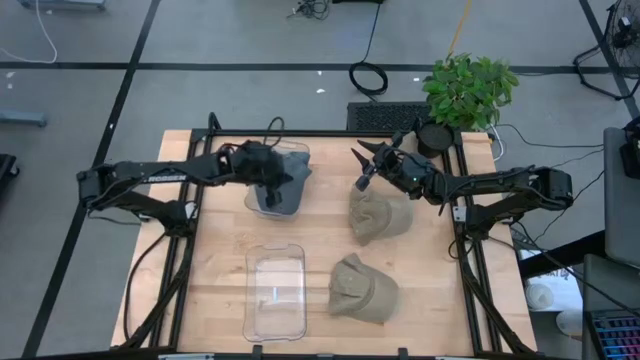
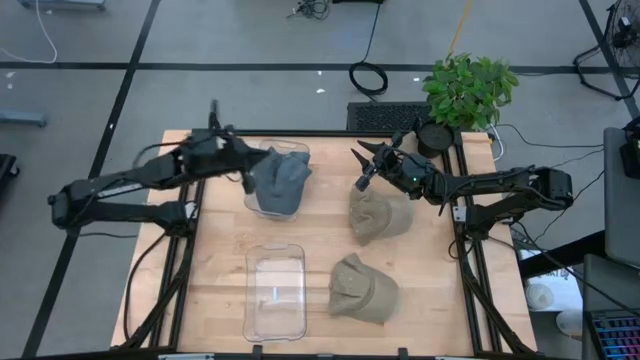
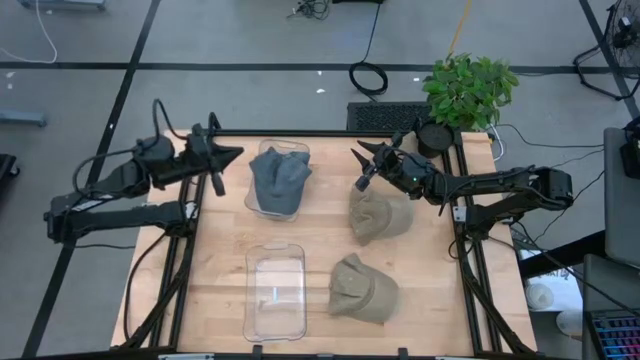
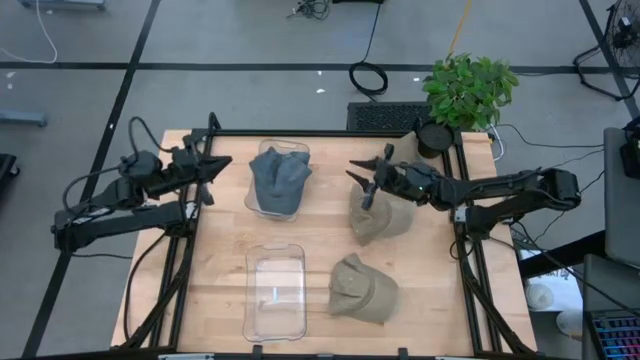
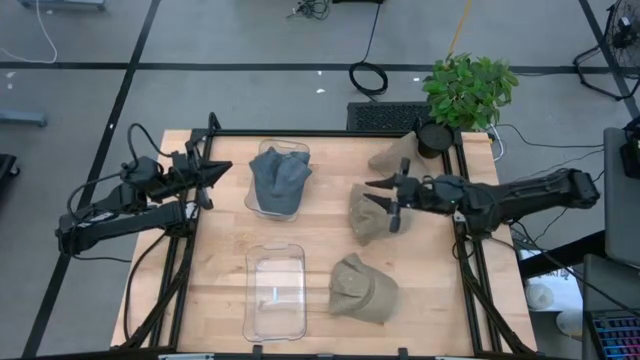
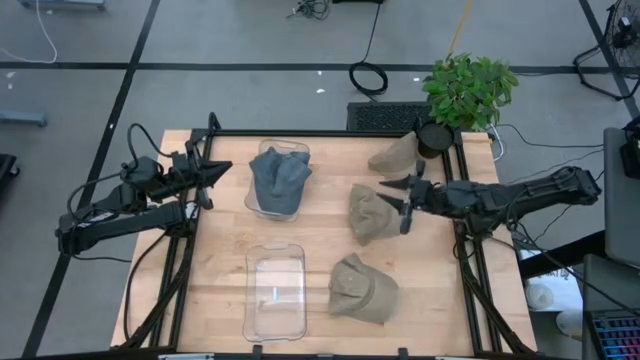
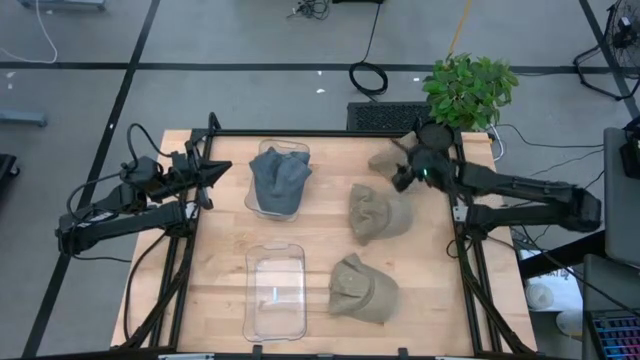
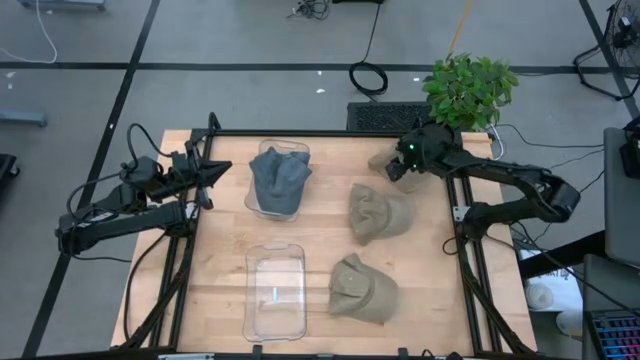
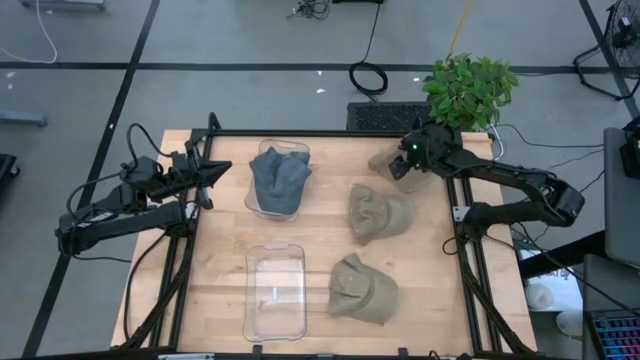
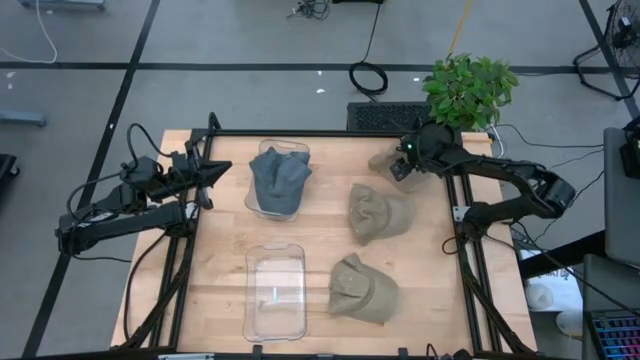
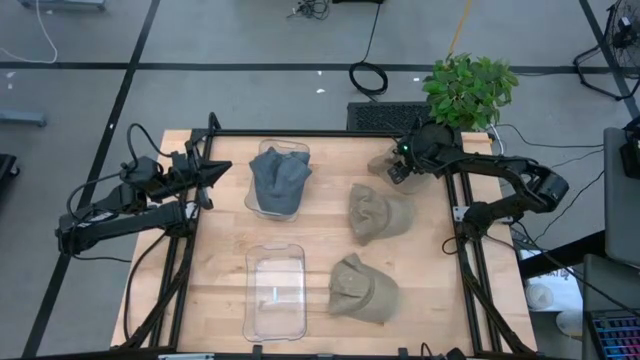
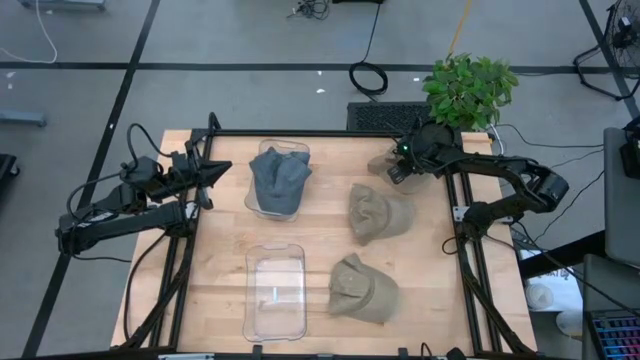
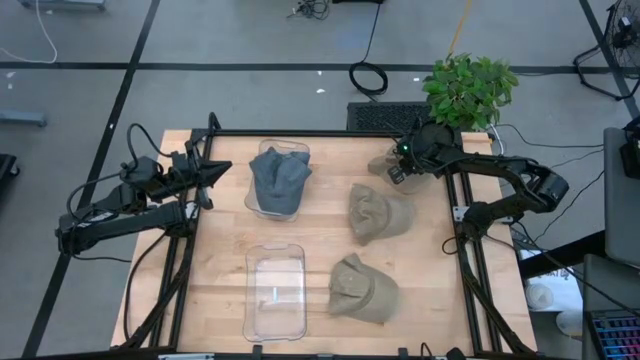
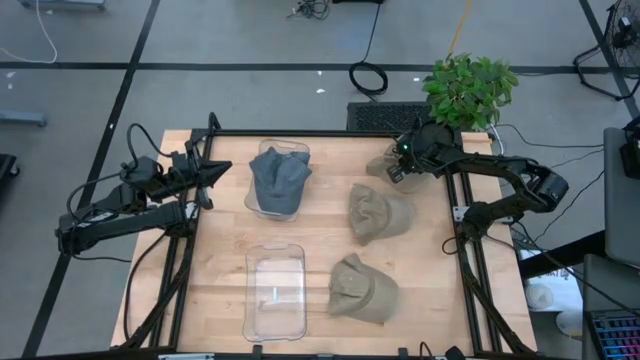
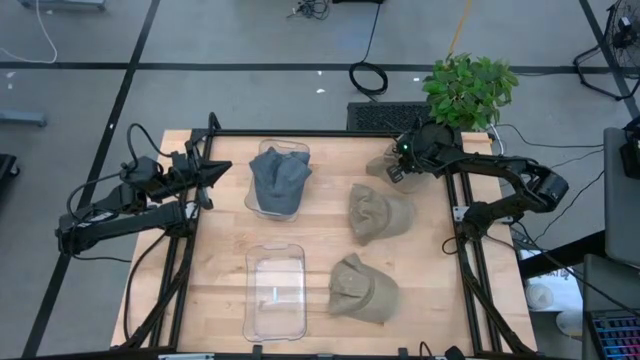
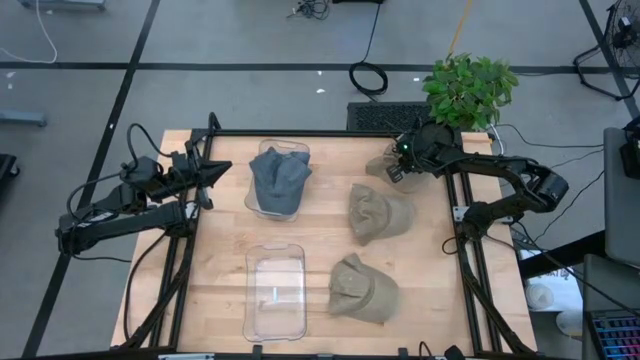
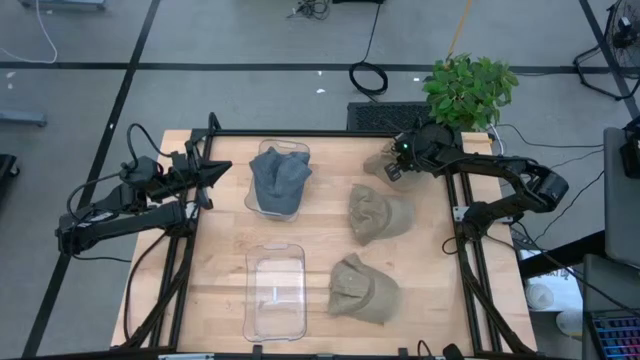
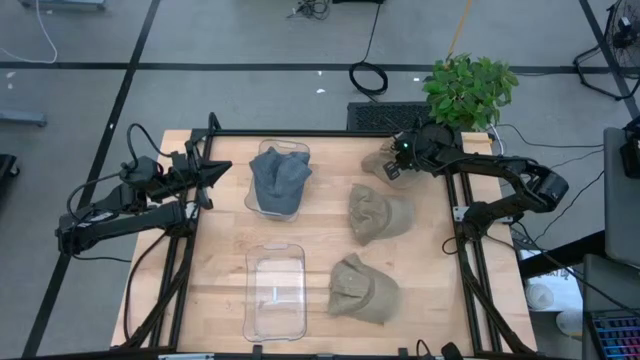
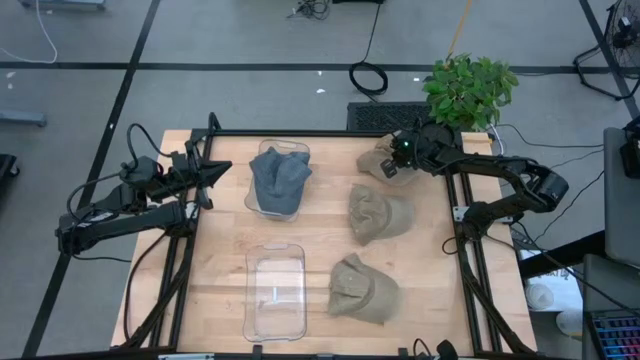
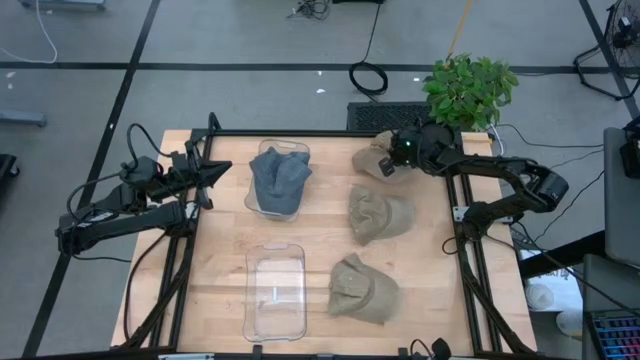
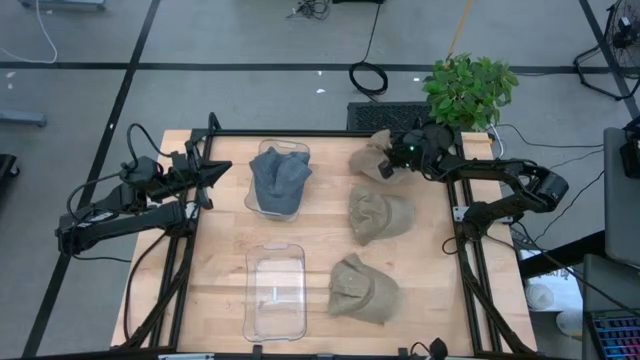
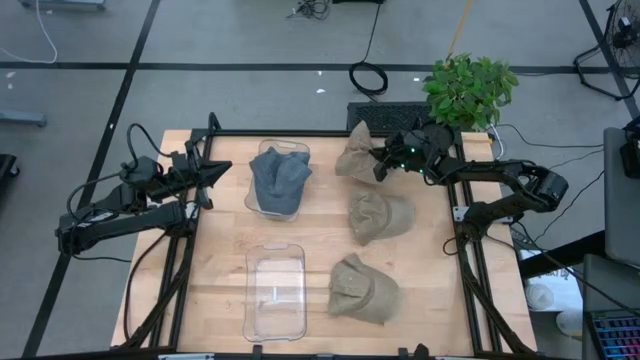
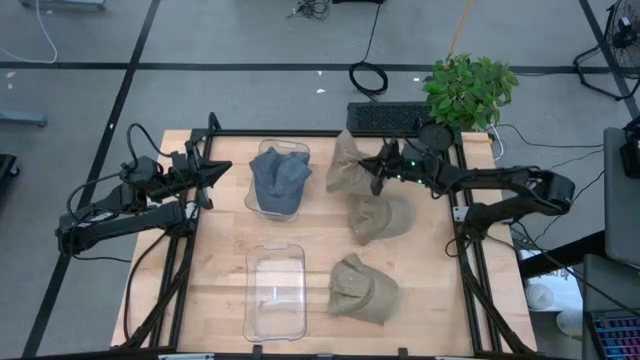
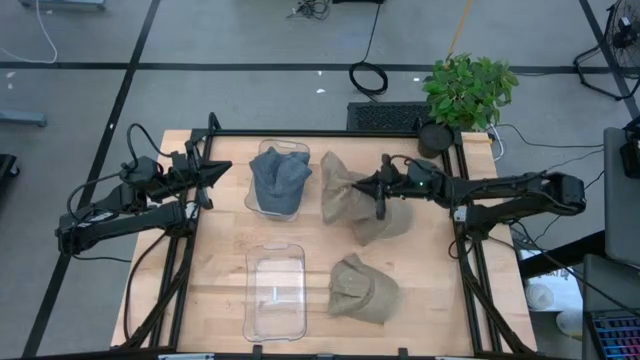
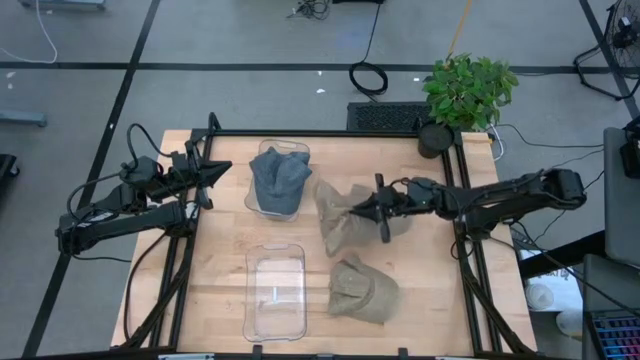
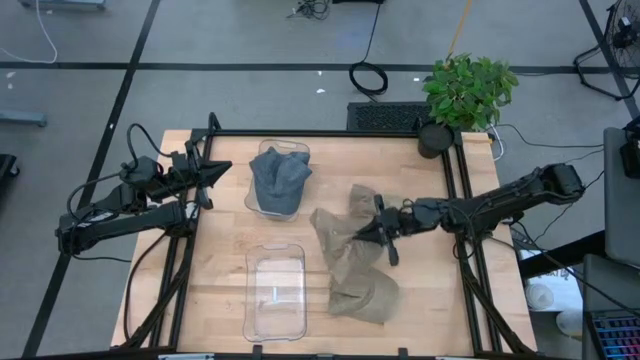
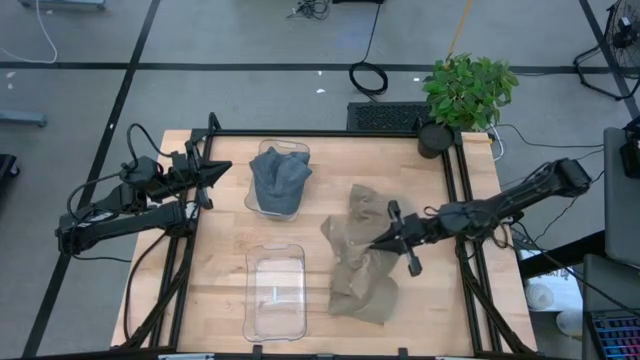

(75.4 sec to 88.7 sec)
Task: Stack caps by color
Put the top brown cap into the bottom transparent bin

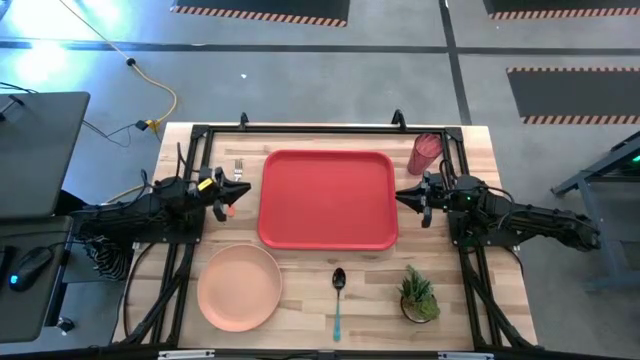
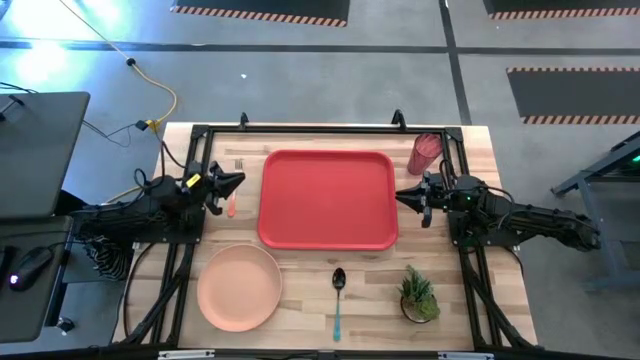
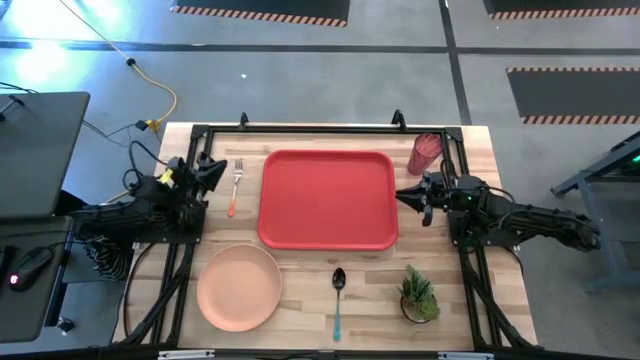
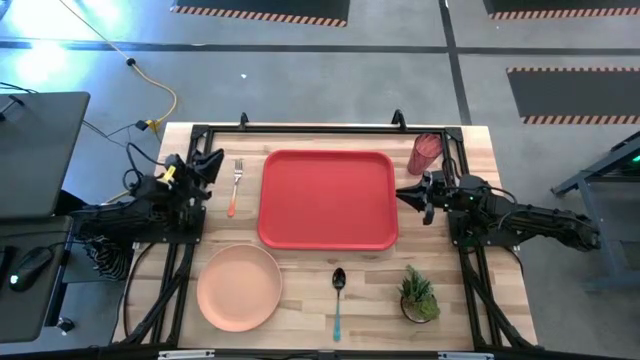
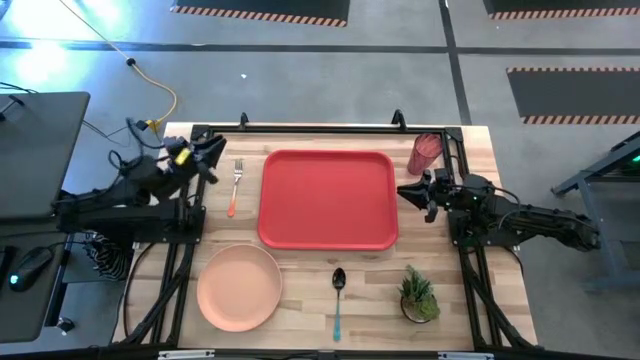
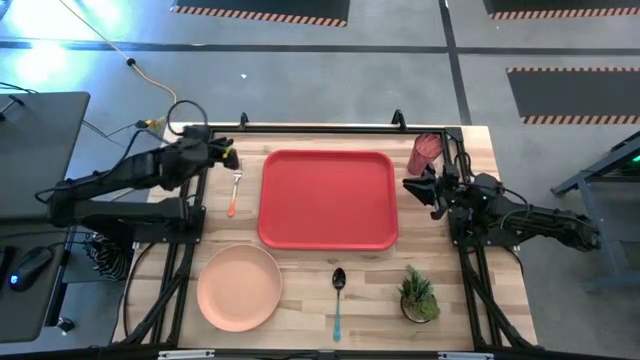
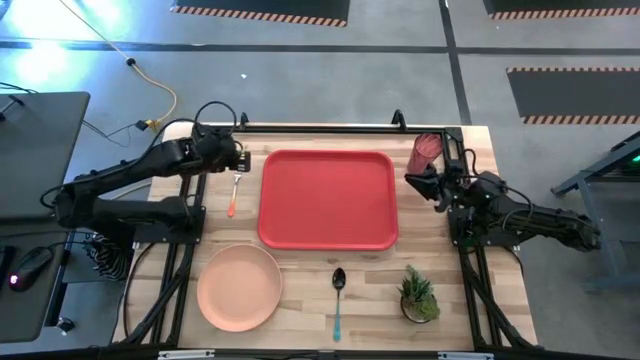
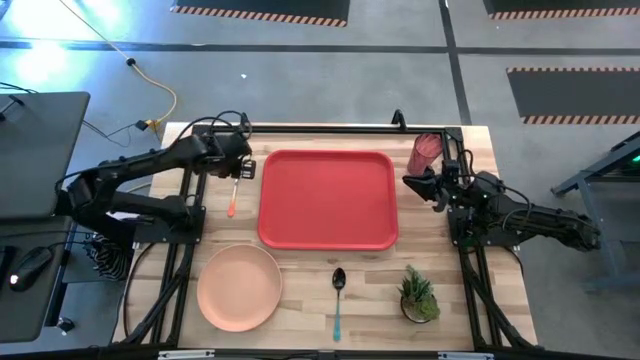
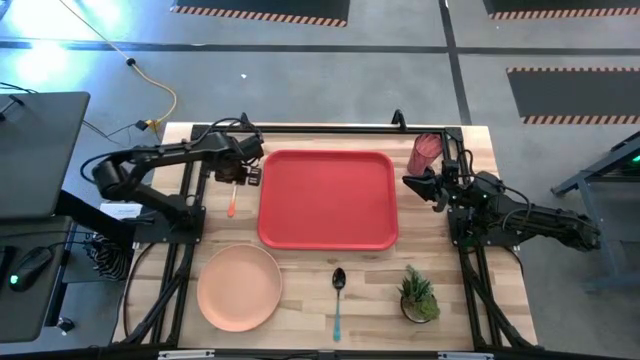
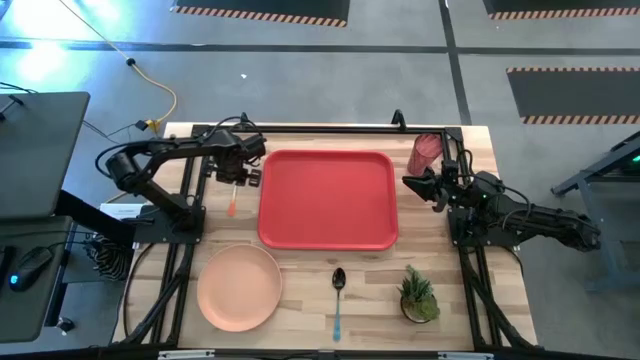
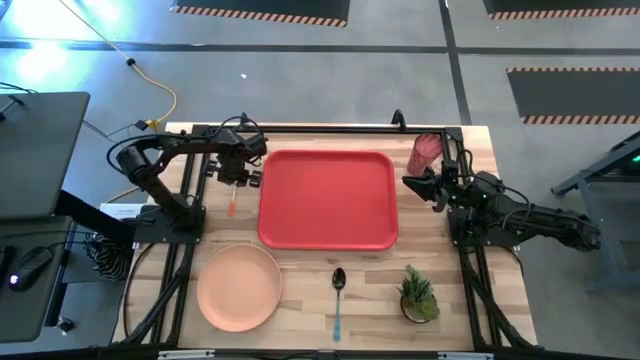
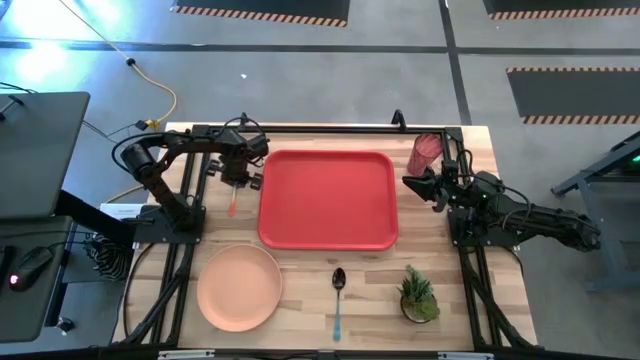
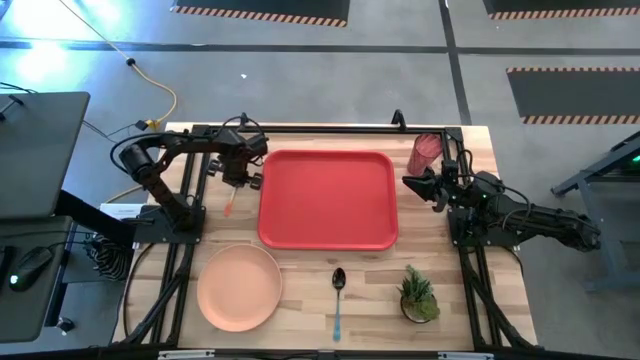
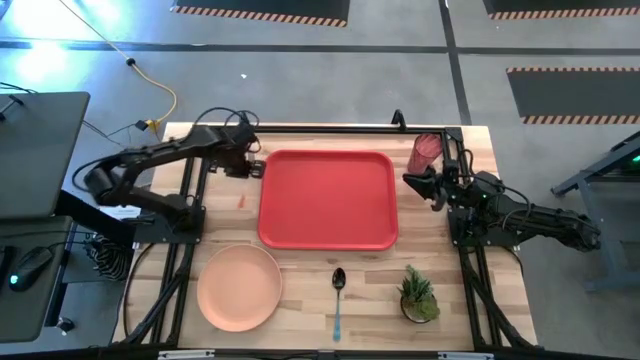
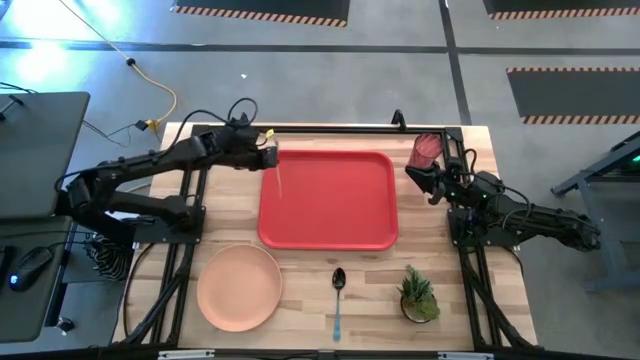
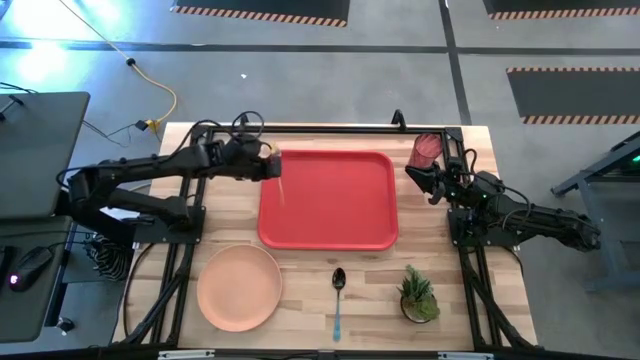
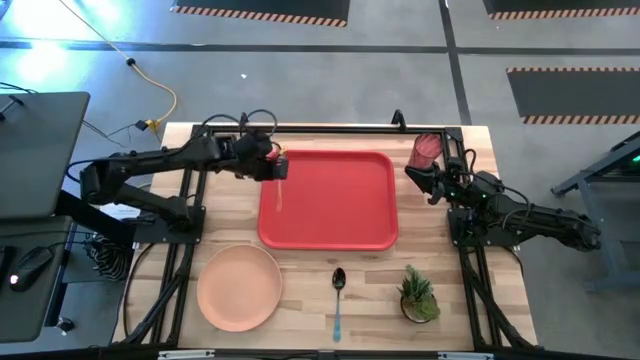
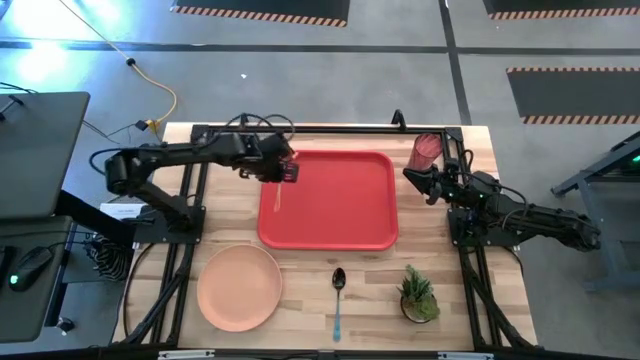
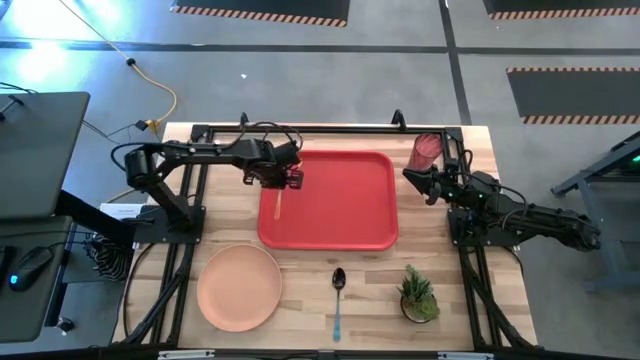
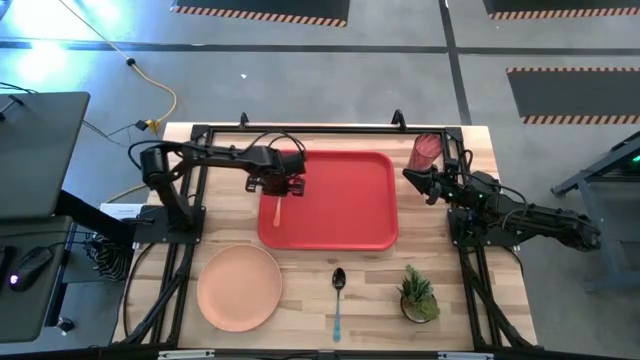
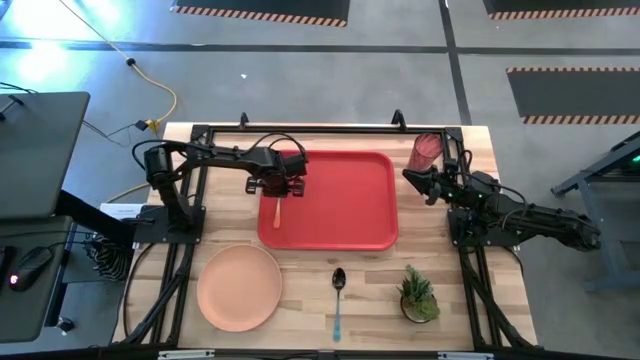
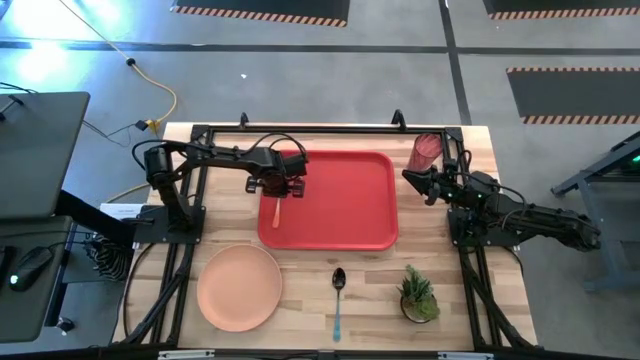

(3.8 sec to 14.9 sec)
Task: Pick and place plate/cup/fork/spoon on tray
Put the fork on the tray
